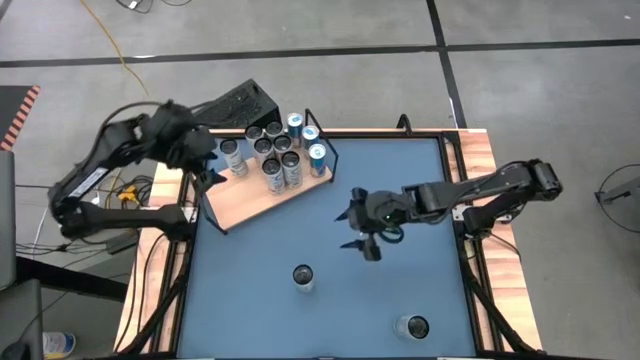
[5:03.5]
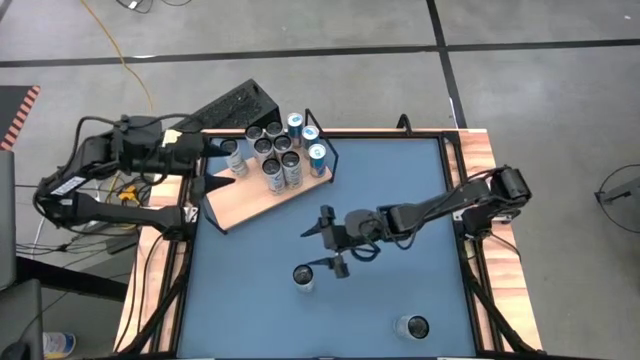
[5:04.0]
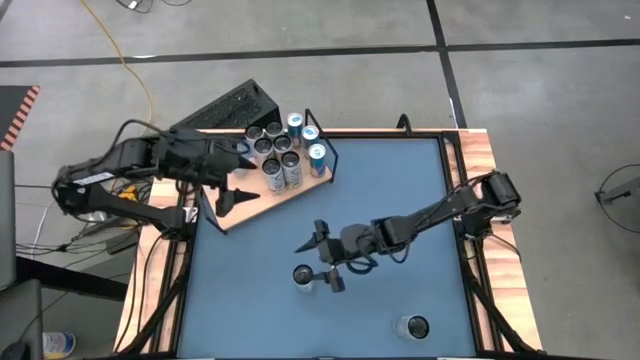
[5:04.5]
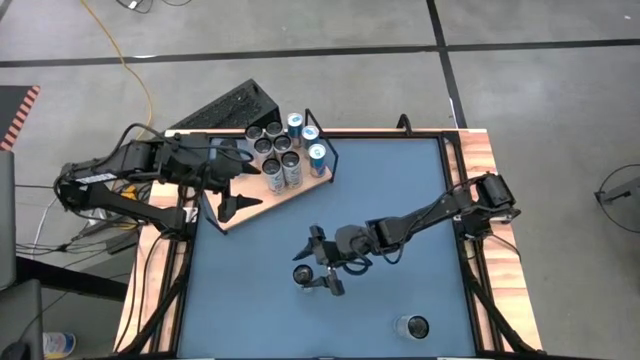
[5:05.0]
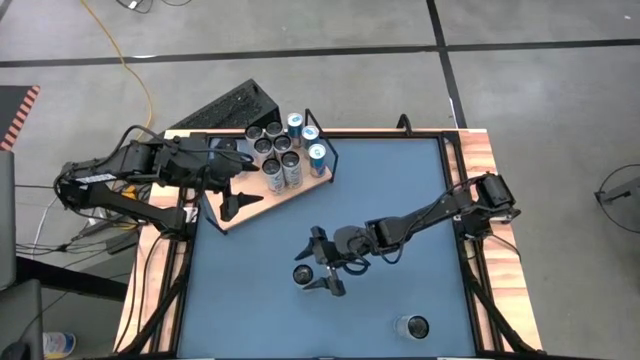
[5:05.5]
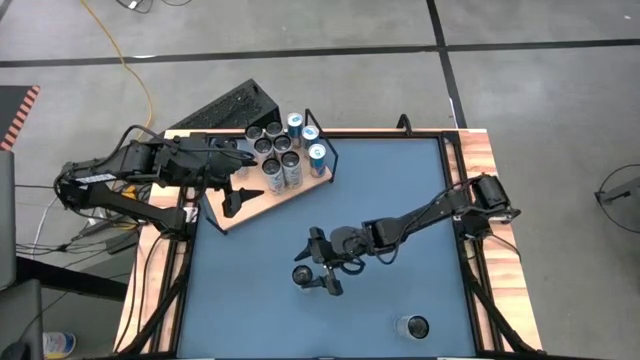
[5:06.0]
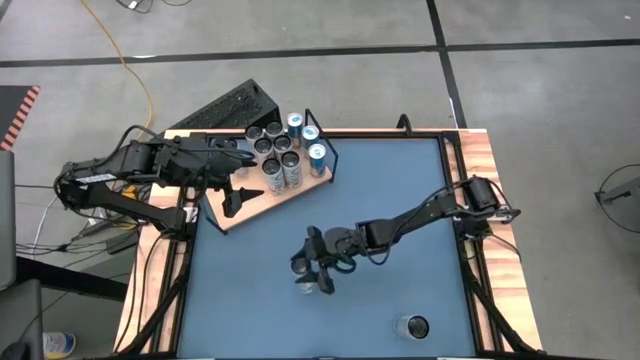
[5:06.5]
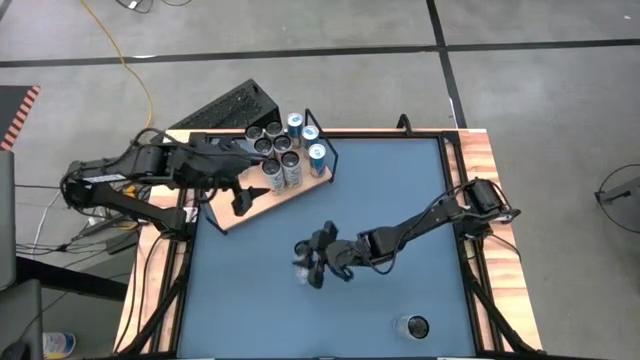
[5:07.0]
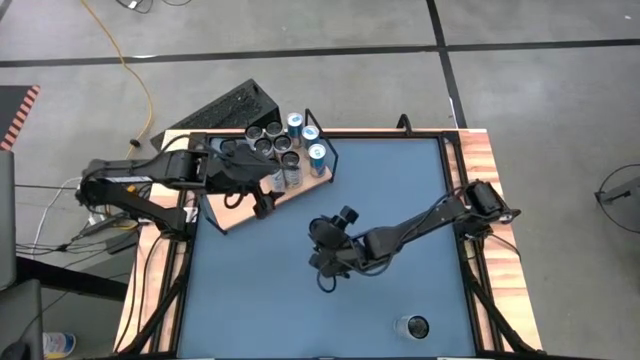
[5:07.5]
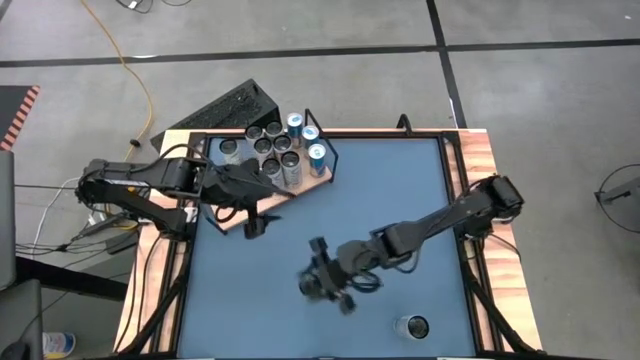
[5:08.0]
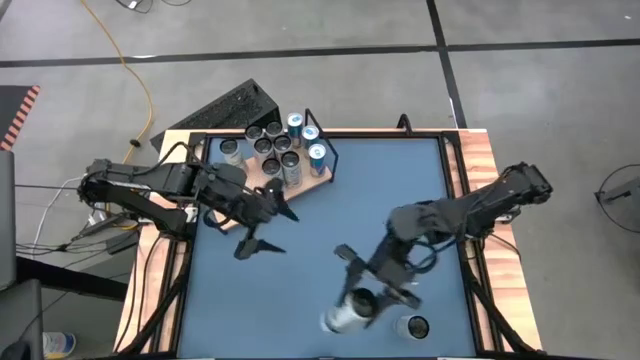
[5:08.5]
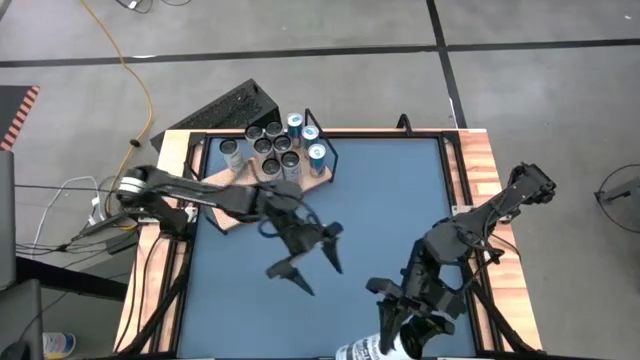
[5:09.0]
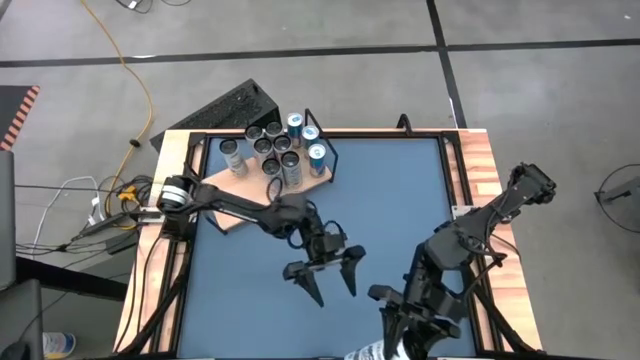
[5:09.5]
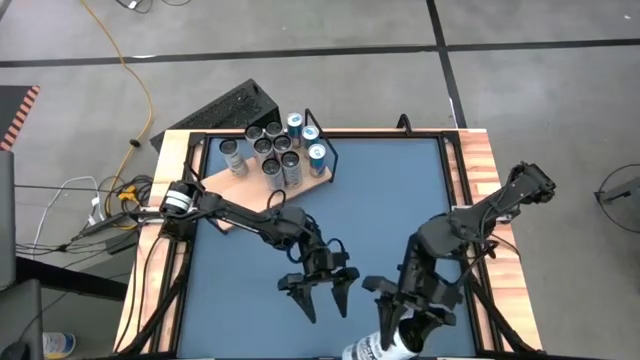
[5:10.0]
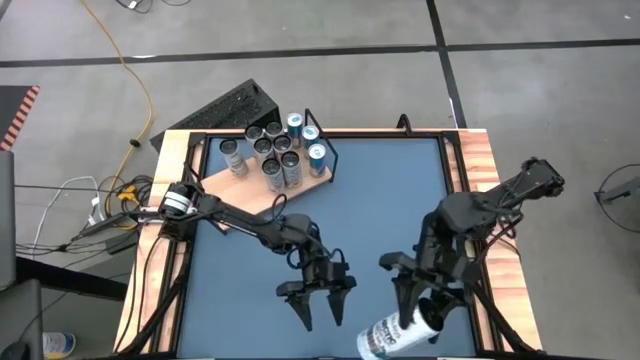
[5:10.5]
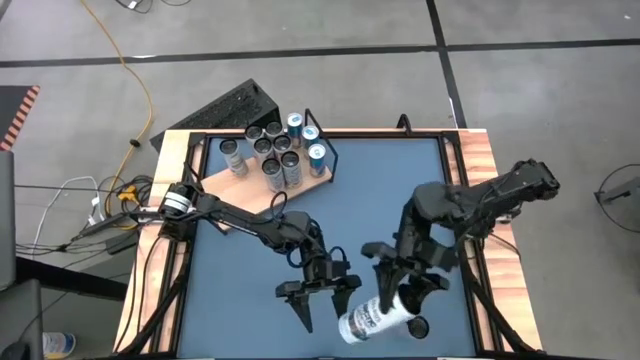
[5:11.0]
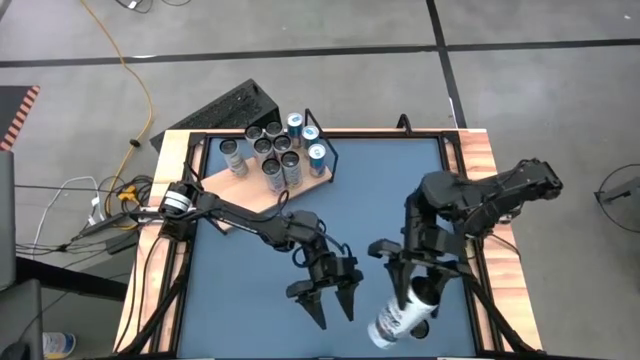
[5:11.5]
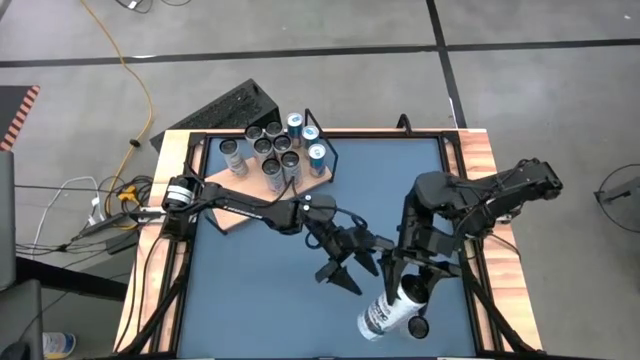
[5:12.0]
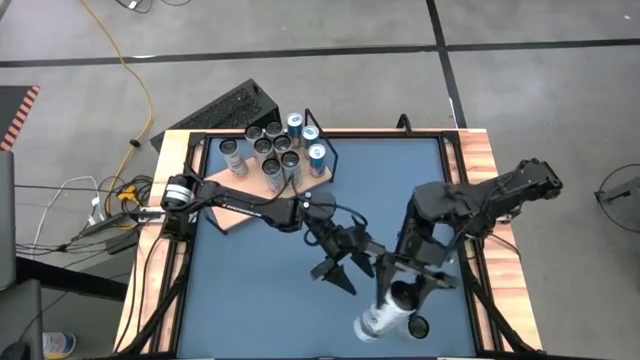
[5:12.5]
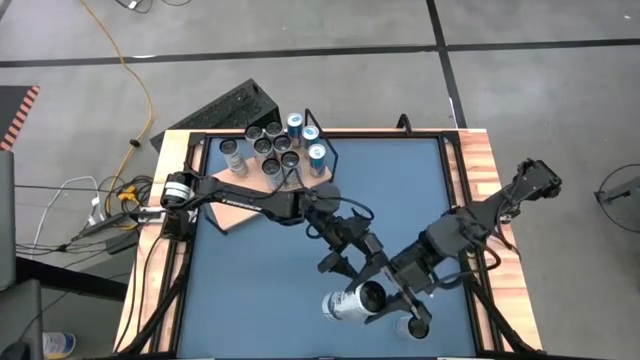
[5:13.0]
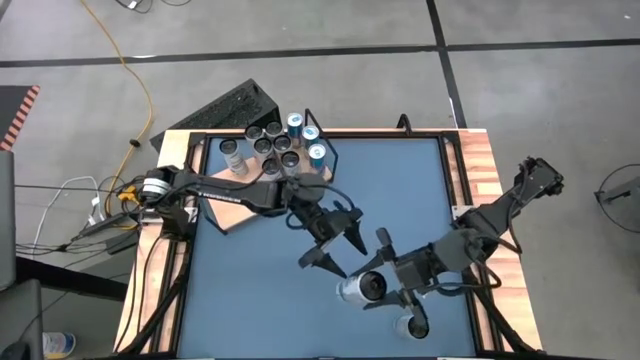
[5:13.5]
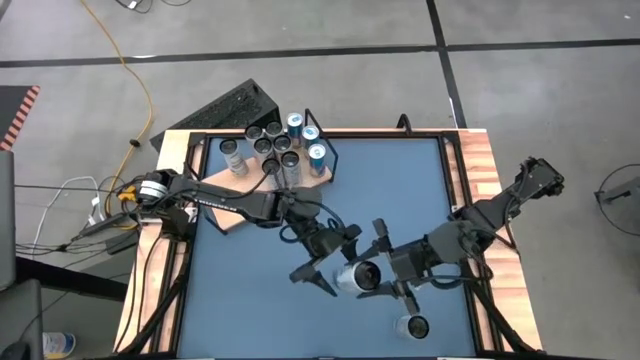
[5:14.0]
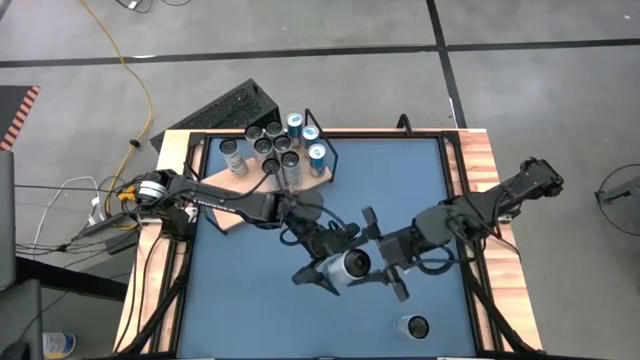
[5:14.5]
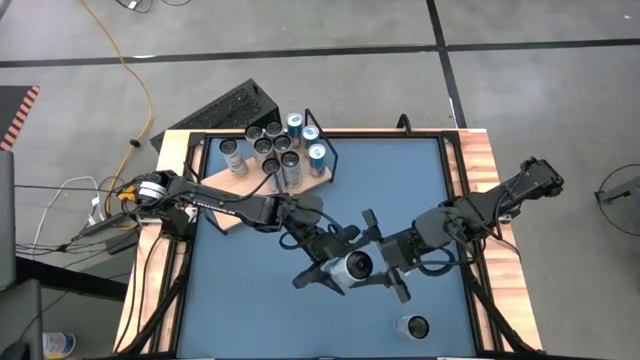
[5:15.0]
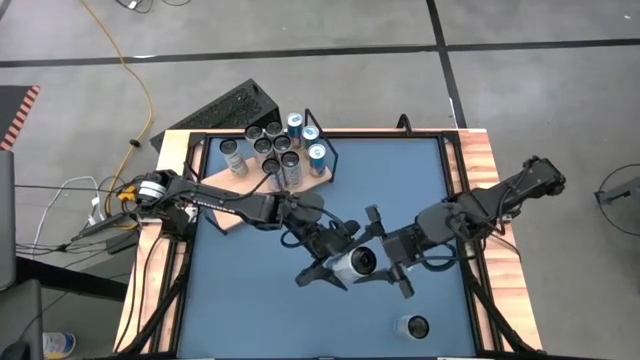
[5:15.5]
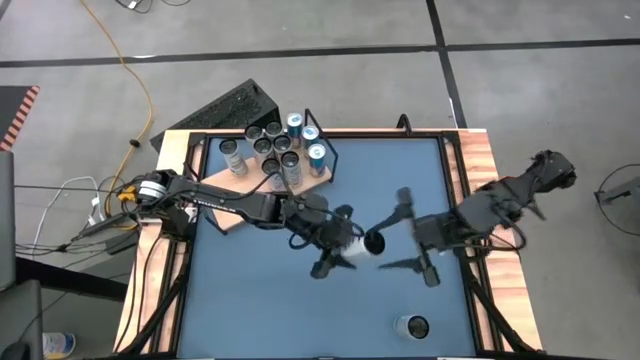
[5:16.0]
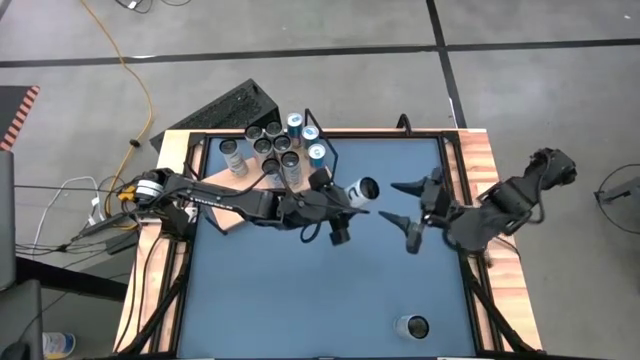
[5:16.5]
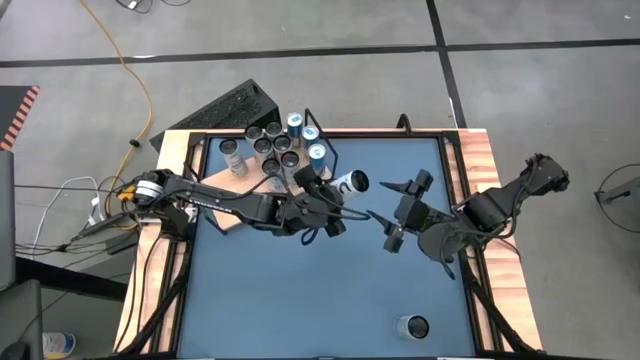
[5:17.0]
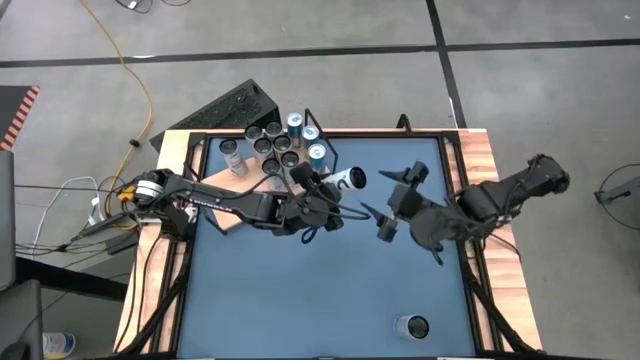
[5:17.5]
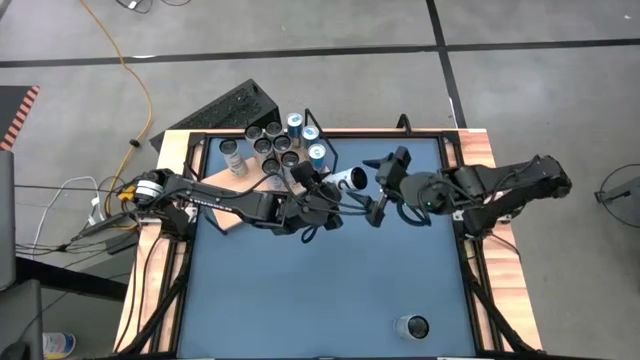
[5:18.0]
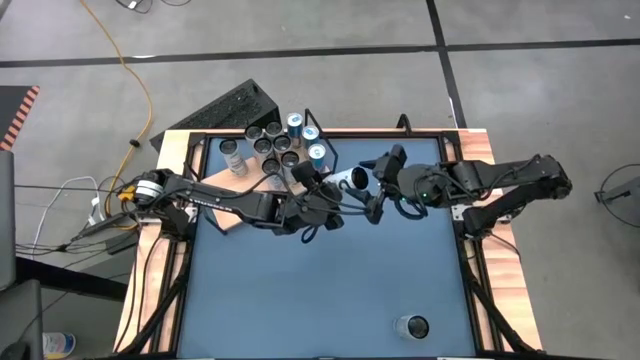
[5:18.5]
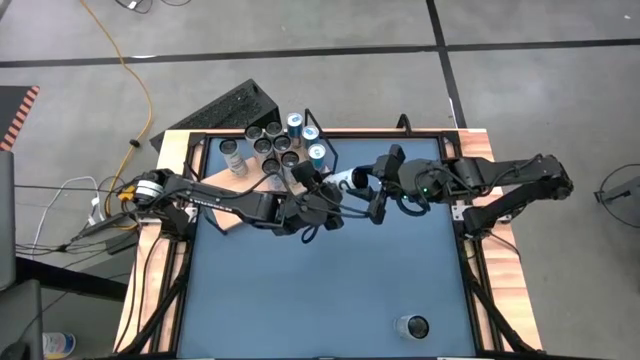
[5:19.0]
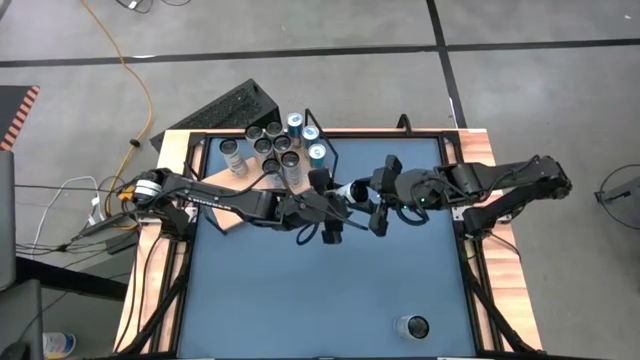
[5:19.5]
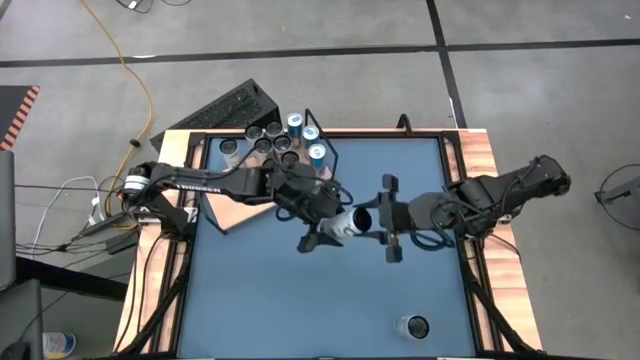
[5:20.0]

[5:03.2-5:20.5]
Task: Place canned beverage on shelf
Put the left white and blue soda can on the shelf aligned with the other white and blue soda can

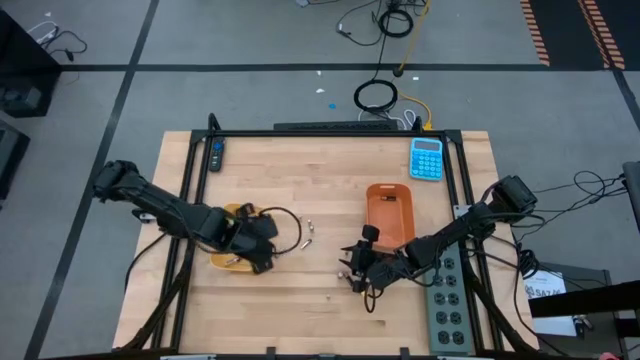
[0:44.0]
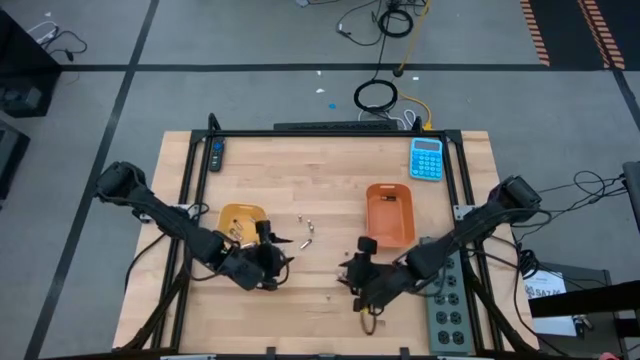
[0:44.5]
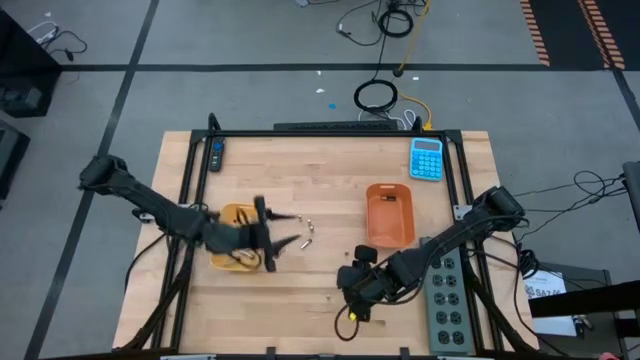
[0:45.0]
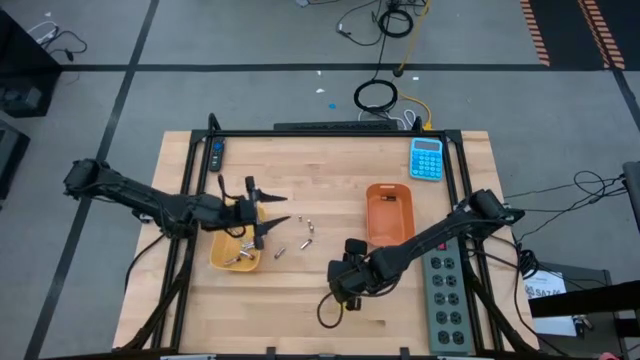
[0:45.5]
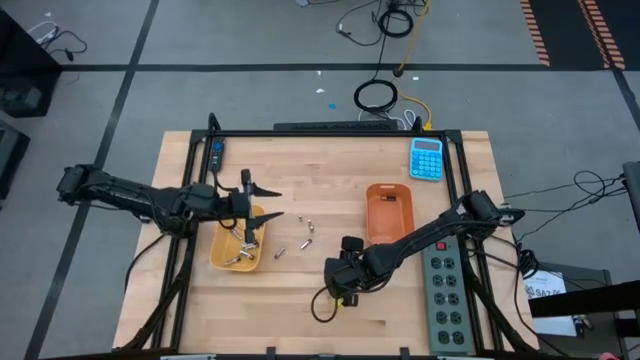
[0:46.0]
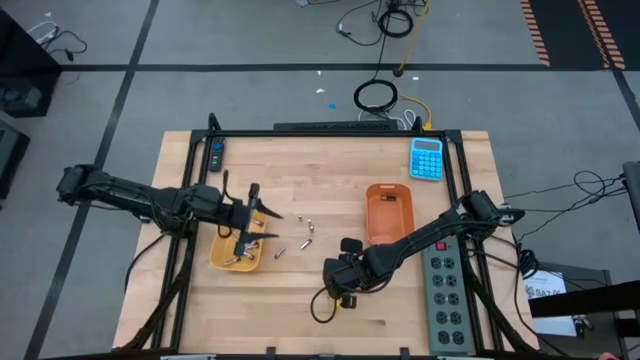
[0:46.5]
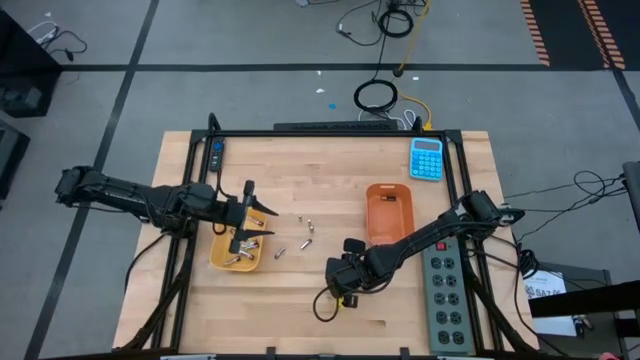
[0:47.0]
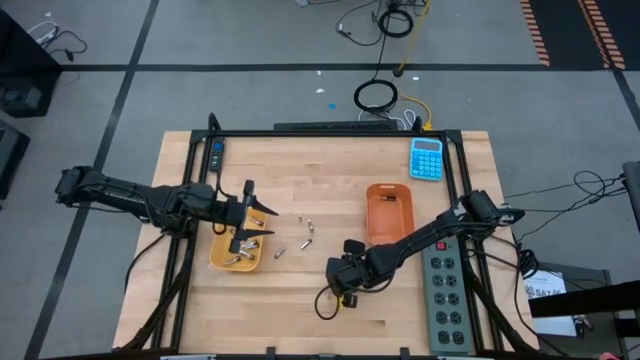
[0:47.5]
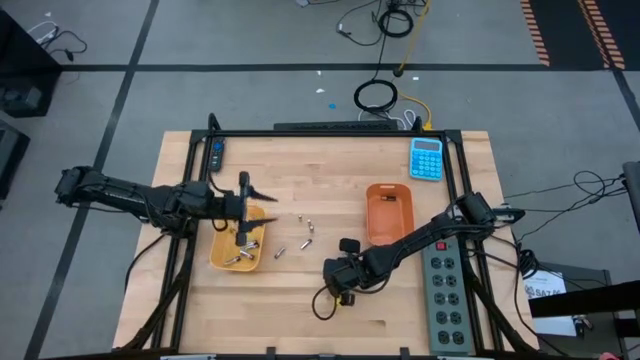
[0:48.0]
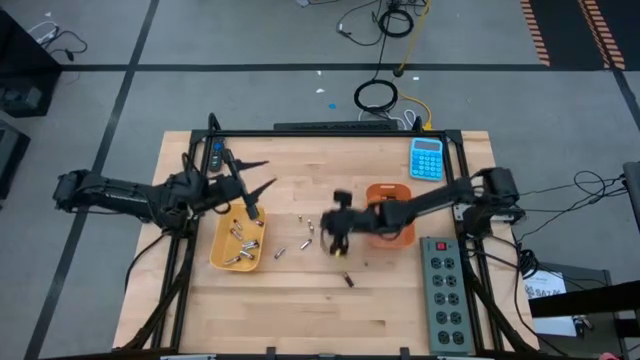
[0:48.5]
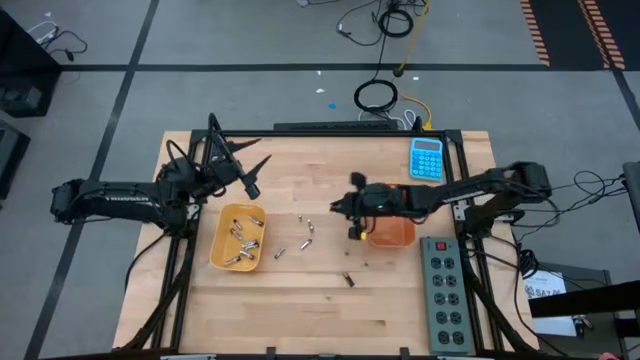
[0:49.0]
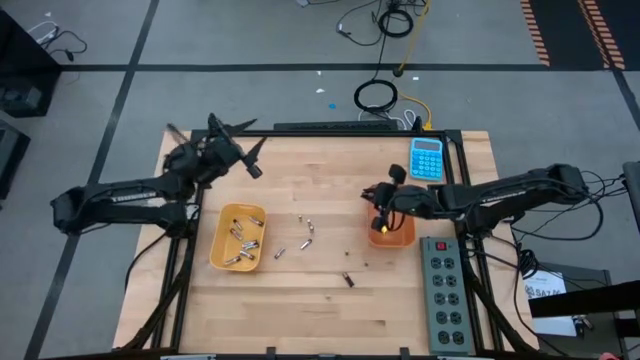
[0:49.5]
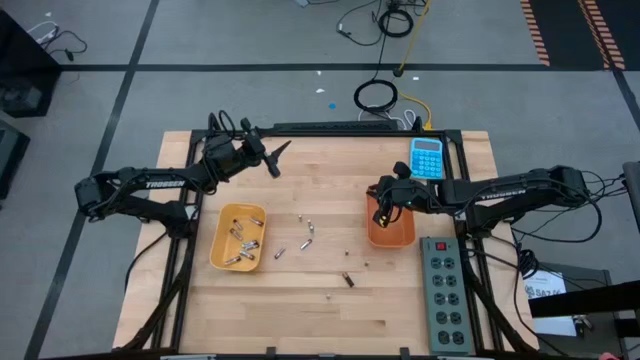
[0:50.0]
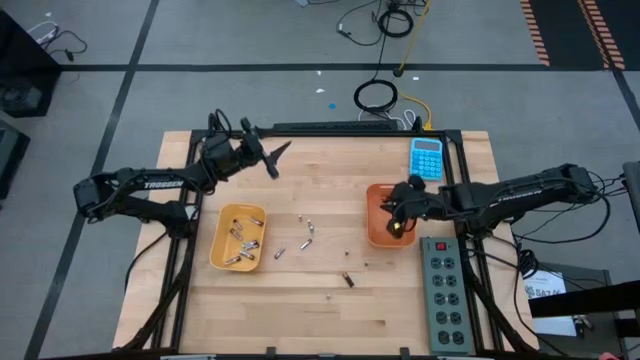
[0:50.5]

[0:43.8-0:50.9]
Task: Sort batteries
Put the black-brown battery into the orange bin
